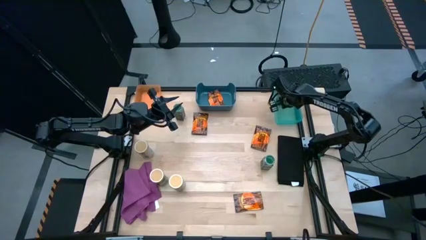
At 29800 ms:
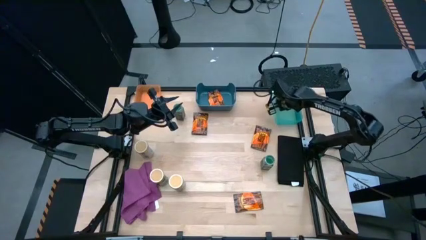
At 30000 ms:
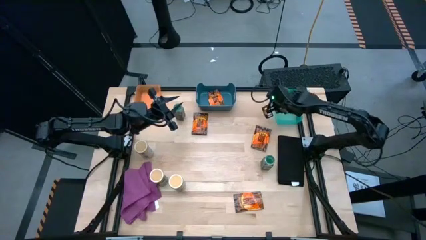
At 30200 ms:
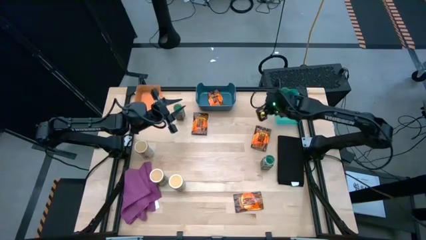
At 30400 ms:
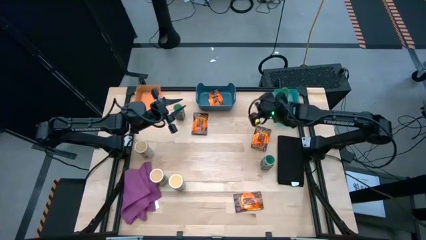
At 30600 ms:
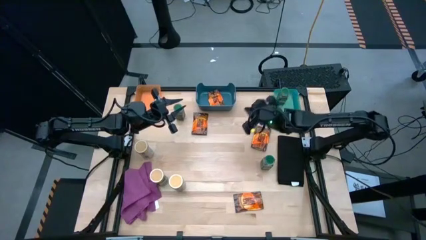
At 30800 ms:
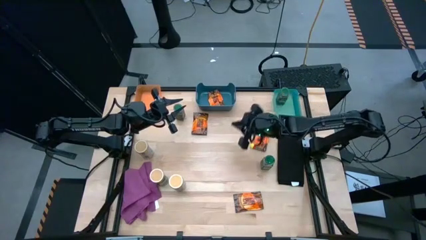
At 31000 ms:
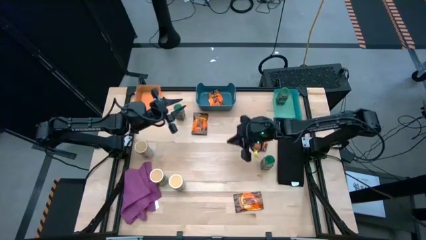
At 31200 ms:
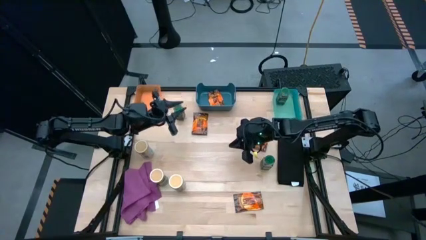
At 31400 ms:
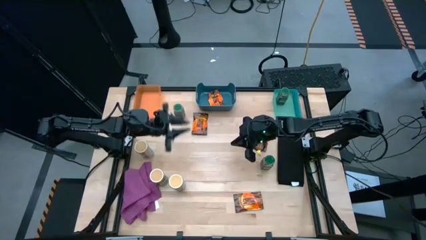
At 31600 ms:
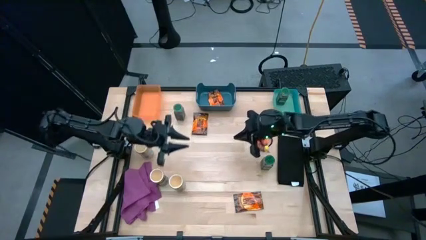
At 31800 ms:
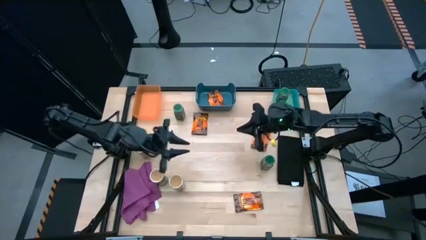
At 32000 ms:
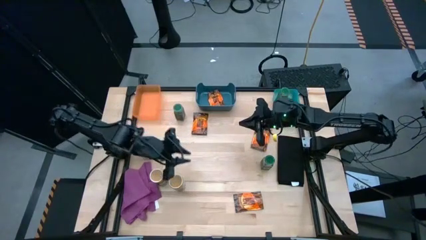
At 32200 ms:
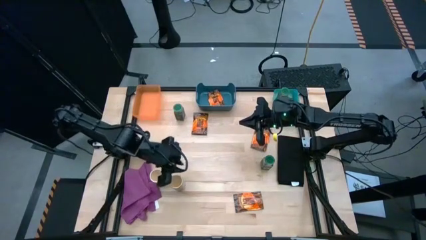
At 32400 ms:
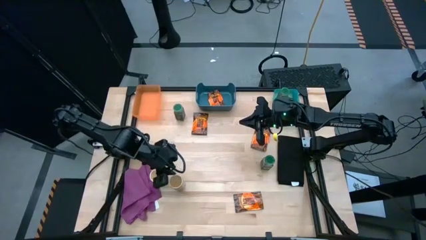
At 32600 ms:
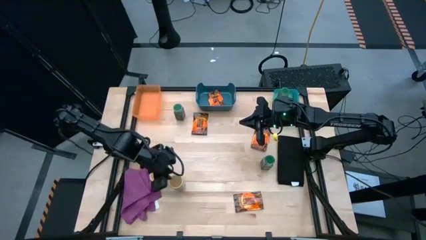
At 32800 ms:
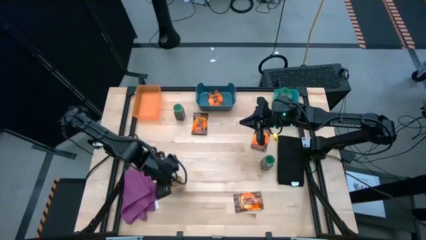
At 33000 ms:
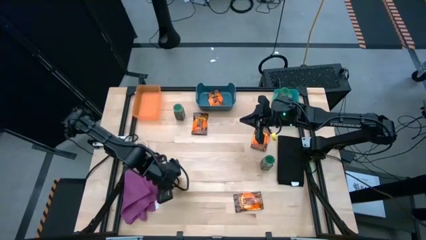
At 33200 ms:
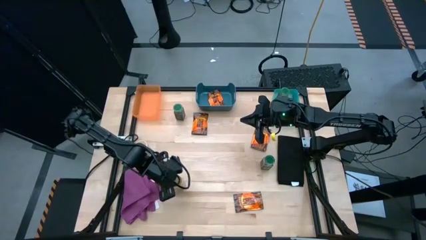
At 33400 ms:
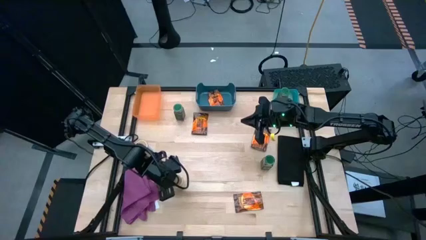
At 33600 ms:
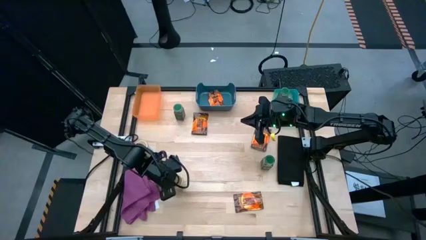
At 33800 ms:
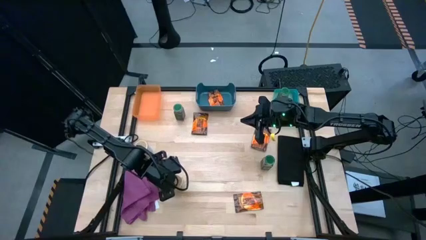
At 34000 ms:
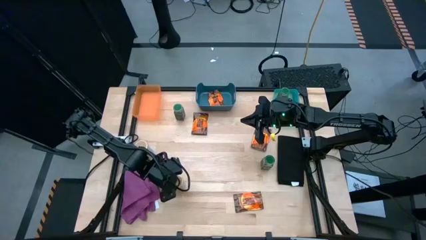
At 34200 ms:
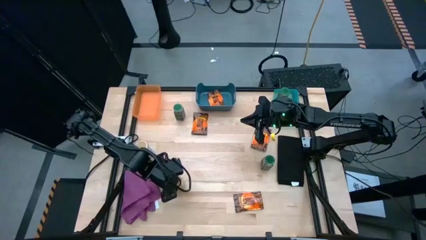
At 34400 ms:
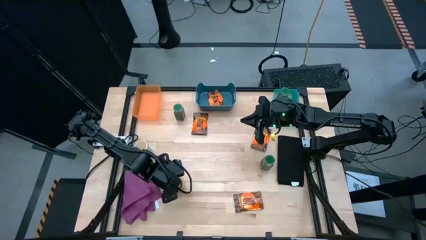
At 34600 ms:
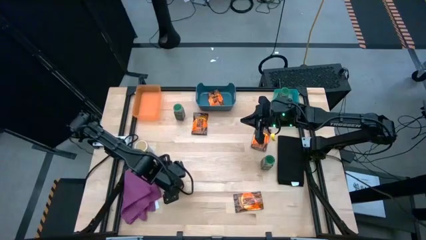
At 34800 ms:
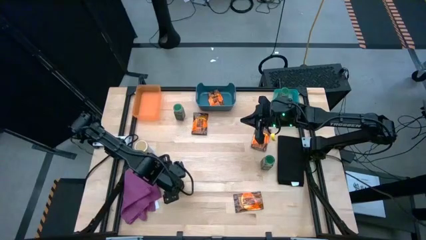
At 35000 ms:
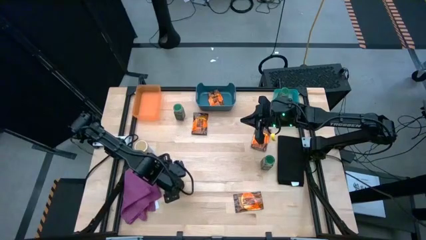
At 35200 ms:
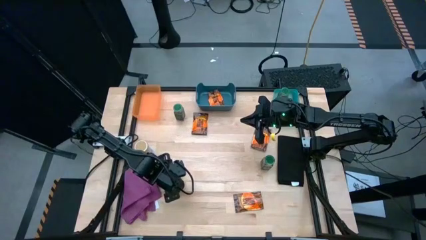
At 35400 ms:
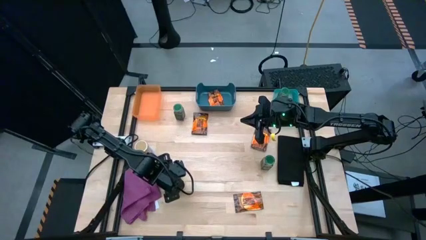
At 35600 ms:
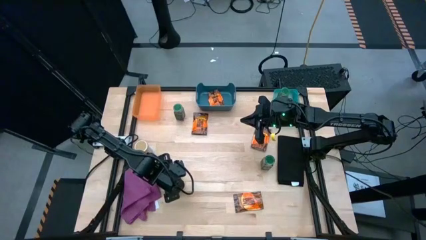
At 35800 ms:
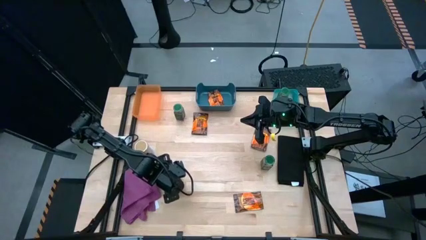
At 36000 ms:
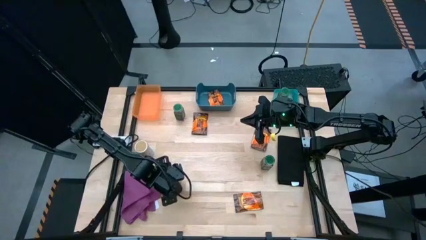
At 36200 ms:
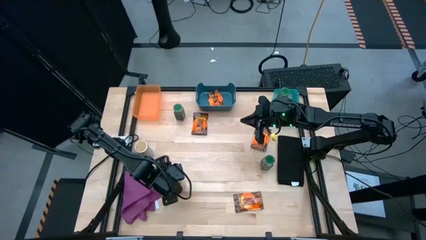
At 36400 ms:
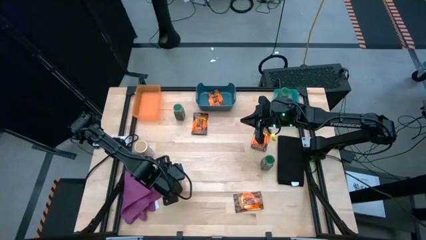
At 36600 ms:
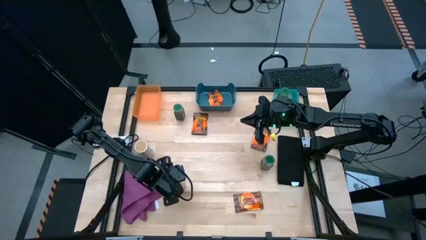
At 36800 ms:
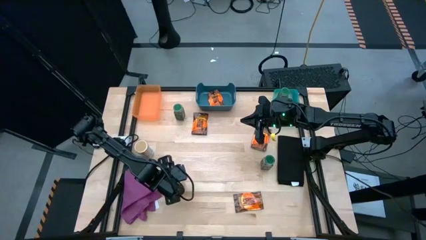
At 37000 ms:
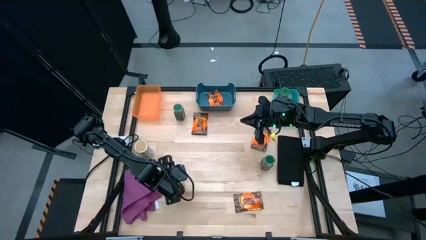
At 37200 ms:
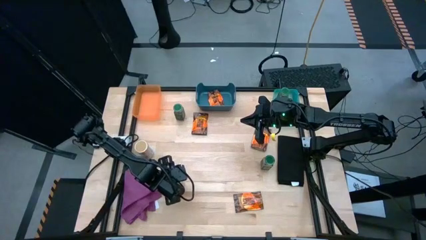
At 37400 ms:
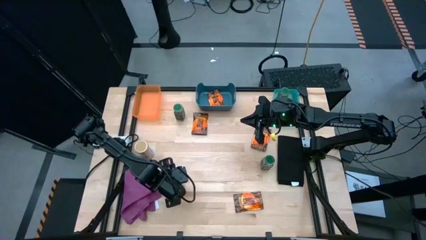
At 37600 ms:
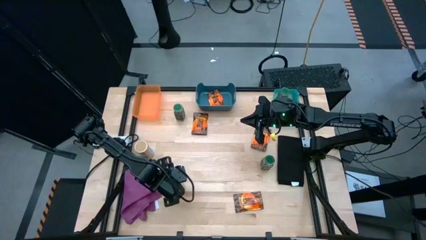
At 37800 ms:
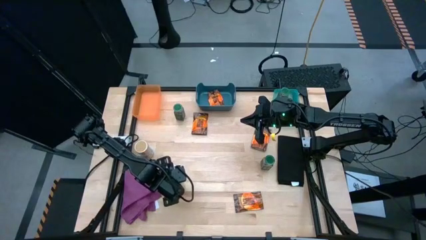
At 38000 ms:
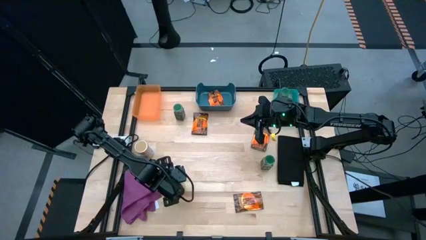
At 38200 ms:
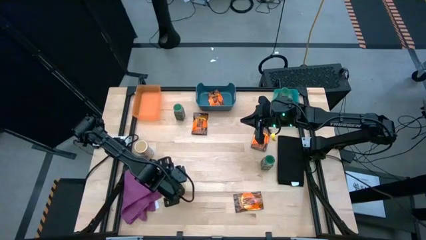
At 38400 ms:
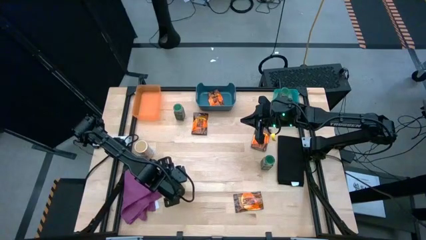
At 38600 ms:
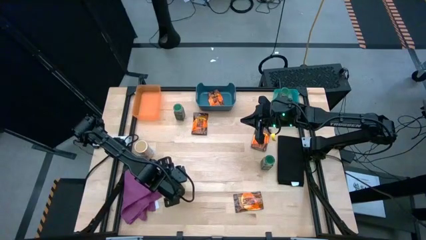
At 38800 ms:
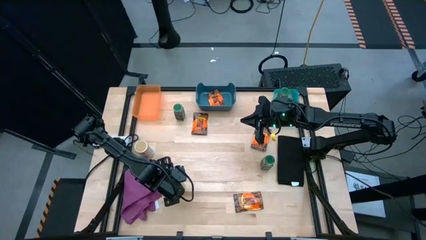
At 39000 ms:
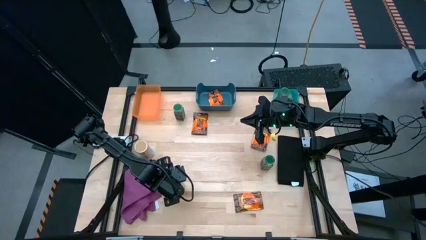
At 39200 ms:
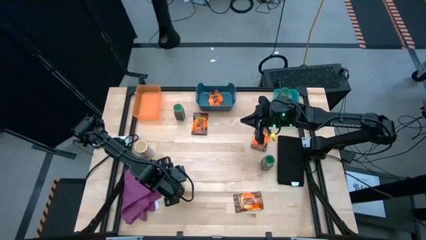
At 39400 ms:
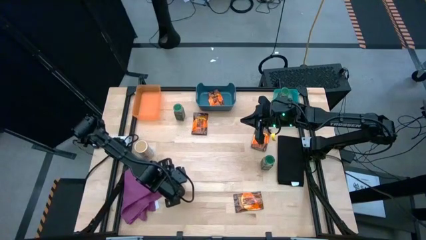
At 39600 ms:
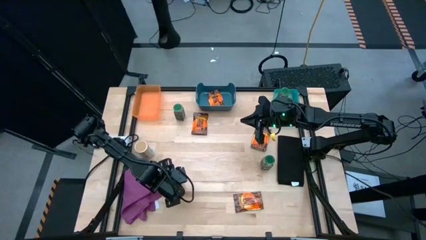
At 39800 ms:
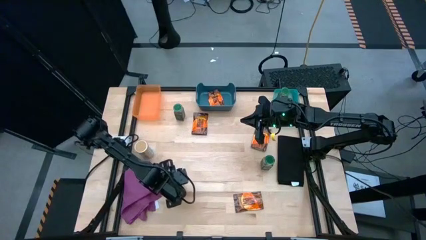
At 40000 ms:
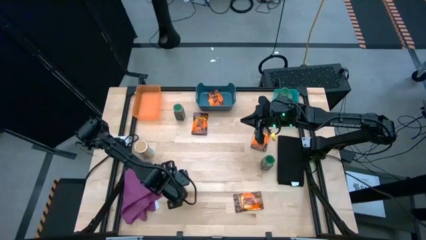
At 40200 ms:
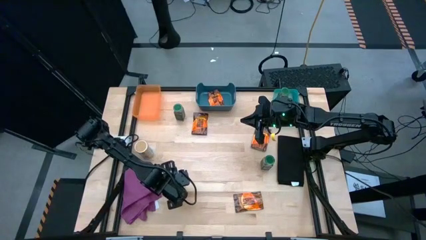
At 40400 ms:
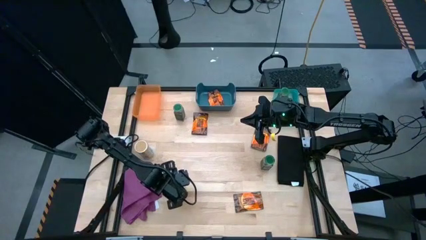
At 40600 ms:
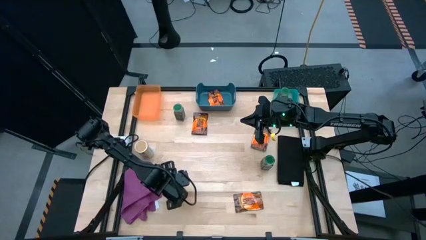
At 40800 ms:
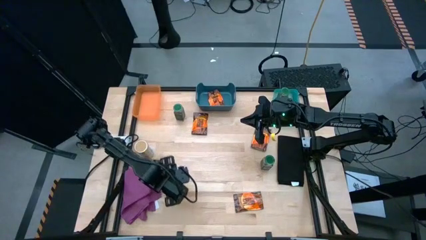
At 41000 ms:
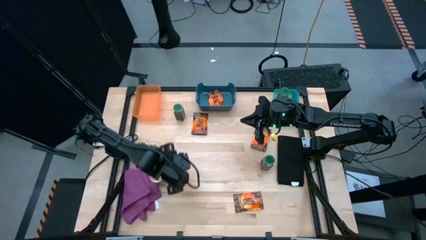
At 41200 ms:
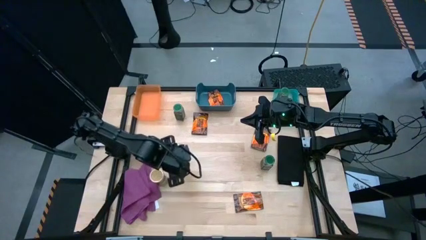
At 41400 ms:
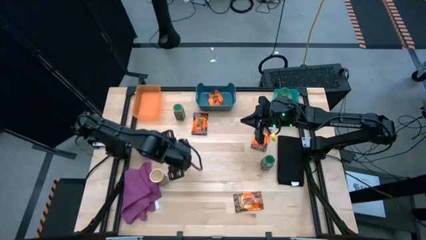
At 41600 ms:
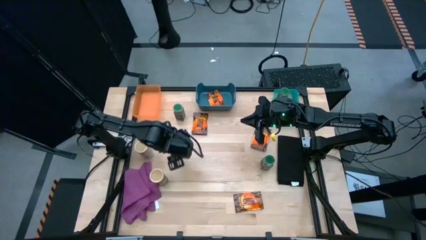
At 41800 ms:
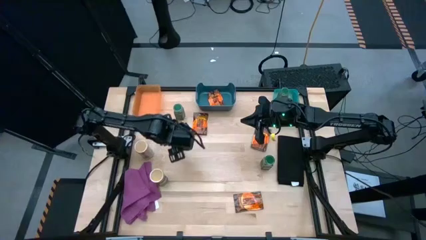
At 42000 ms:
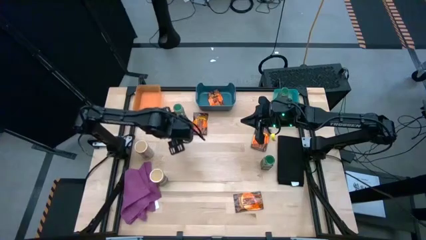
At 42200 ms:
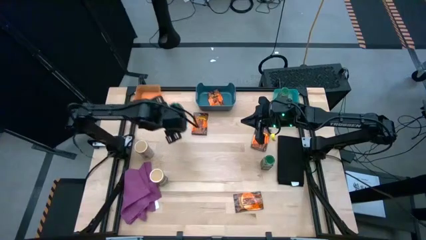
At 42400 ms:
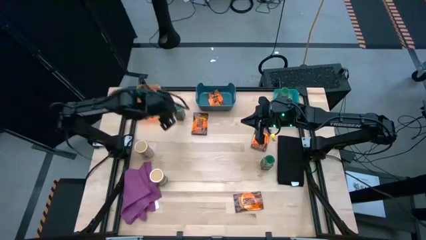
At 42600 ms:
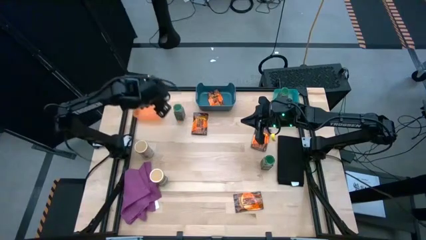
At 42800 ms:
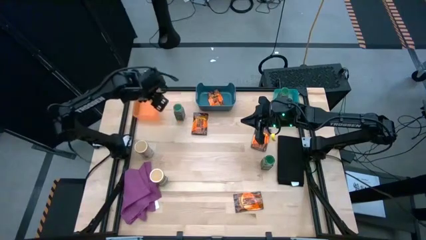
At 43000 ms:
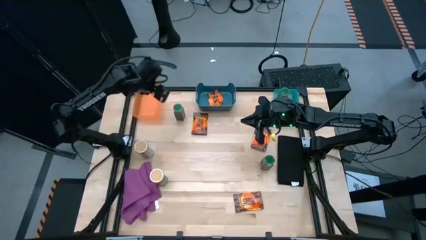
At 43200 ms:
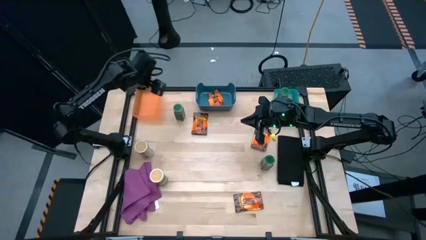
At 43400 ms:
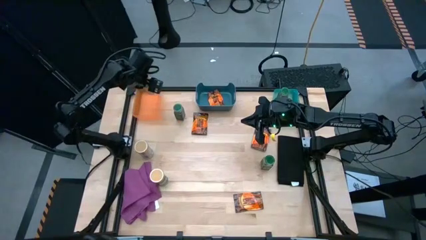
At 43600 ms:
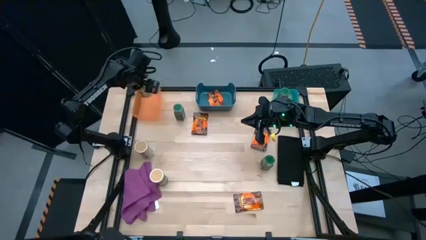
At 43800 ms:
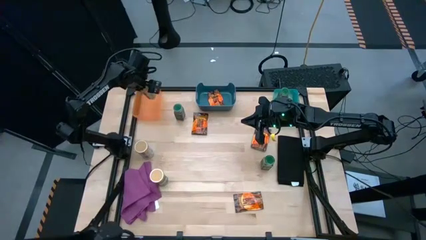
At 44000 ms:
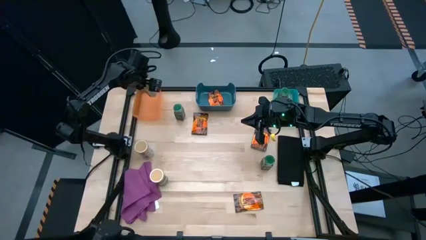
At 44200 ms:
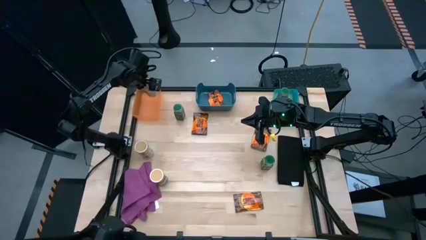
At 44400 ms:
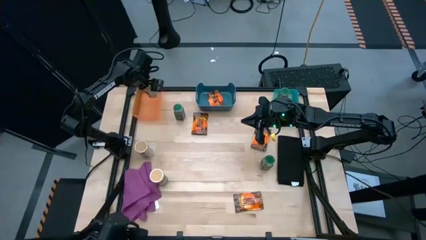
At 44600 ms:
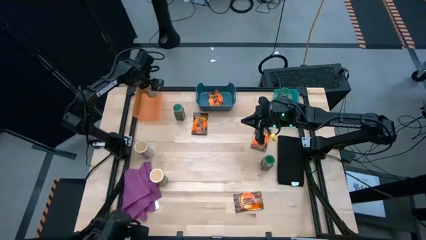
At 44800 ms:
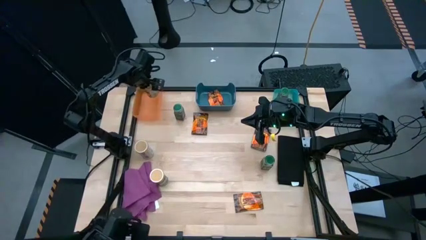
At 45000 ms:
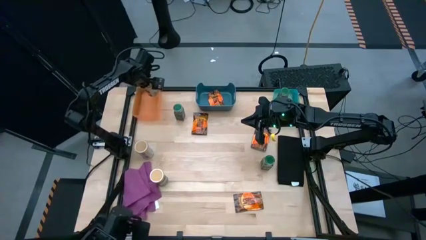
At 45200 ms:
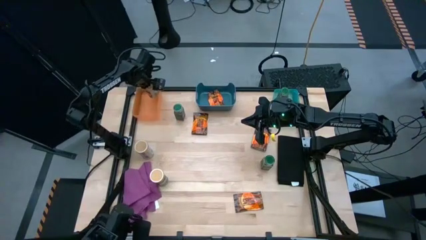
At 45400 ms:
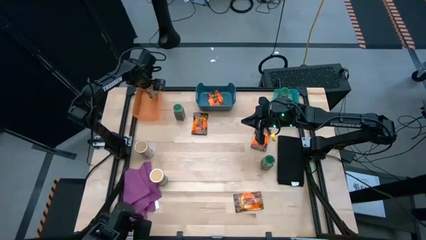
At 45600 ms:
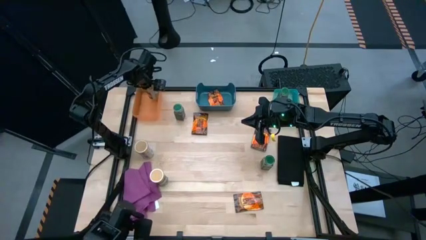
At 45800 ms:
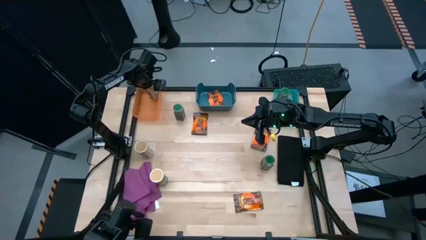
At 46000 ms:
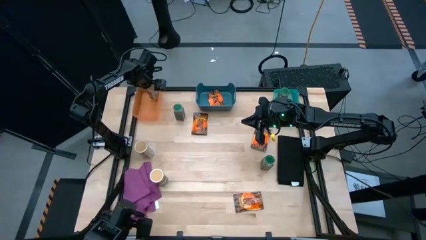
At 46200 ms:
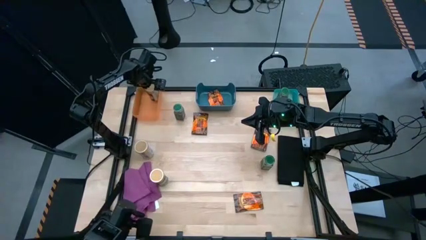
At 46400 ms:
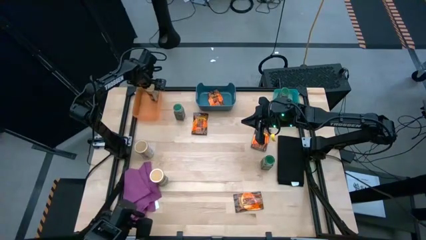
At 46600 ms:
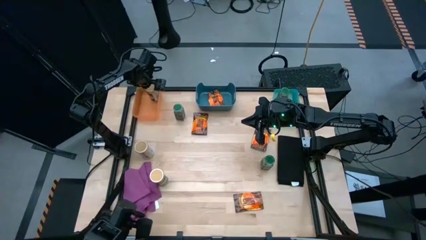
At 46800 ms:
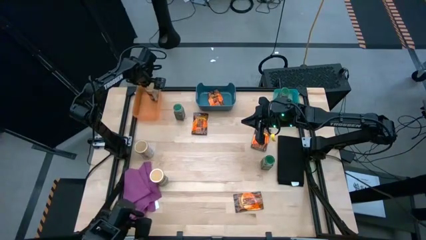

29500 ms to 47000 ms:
Task: Sort spices by type
Put the bottom right gold seasoning bottle into the orange bin
